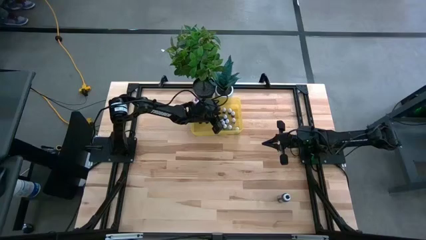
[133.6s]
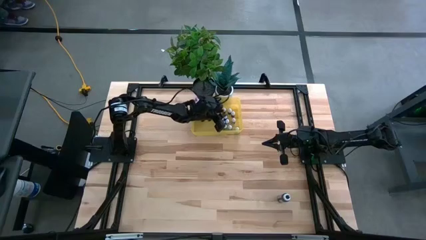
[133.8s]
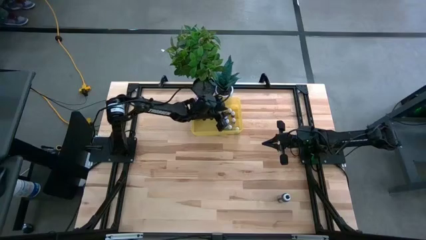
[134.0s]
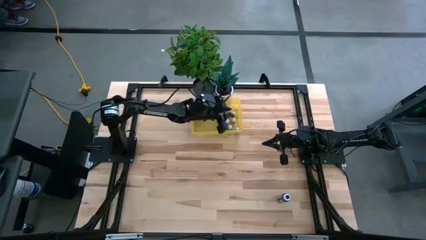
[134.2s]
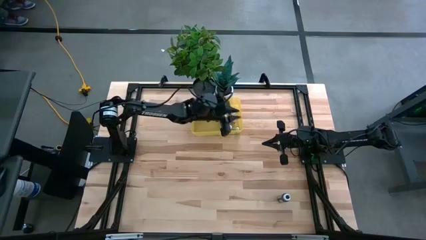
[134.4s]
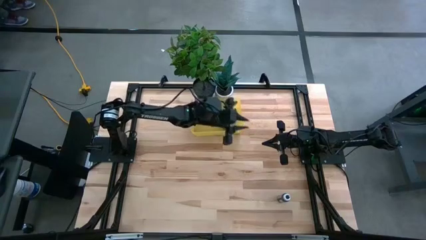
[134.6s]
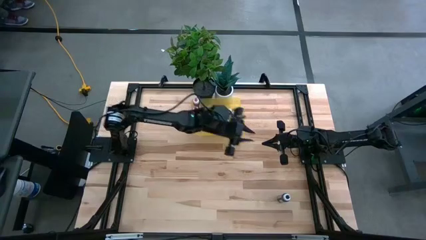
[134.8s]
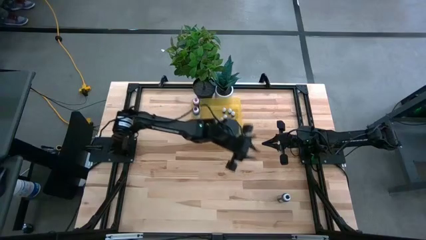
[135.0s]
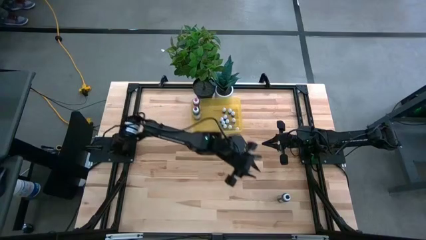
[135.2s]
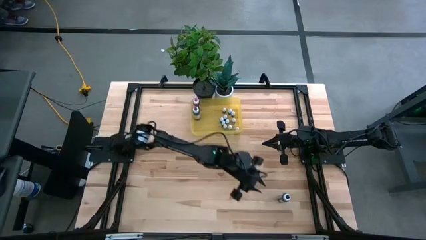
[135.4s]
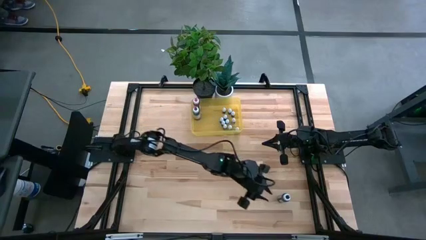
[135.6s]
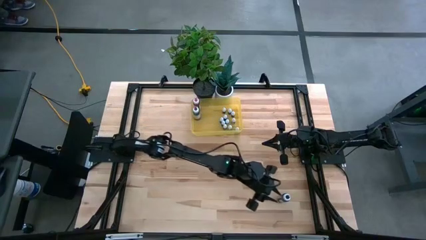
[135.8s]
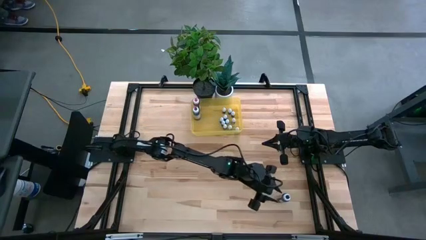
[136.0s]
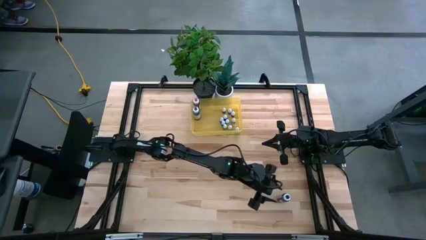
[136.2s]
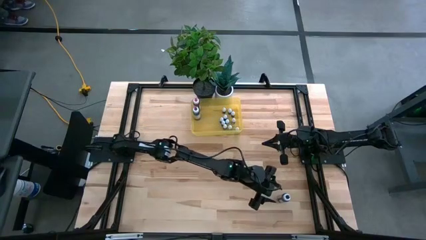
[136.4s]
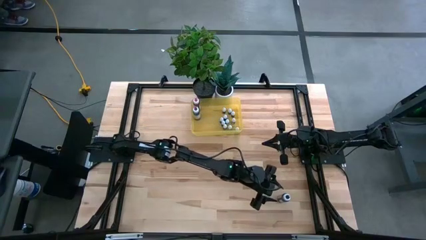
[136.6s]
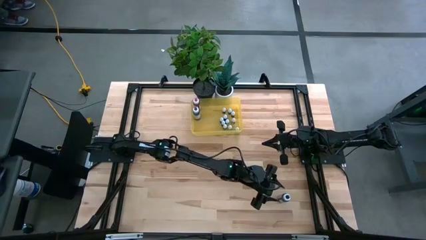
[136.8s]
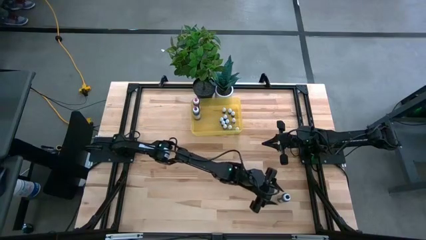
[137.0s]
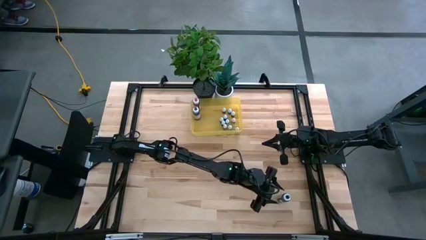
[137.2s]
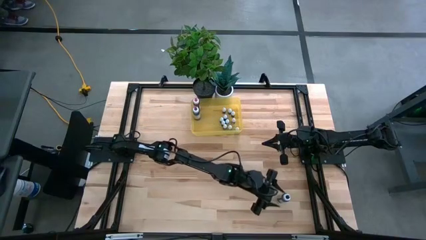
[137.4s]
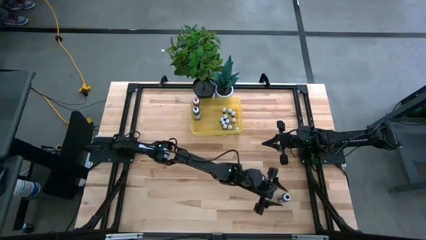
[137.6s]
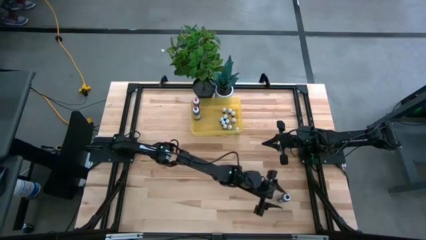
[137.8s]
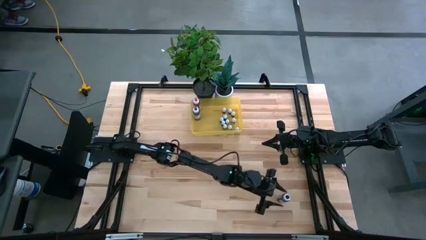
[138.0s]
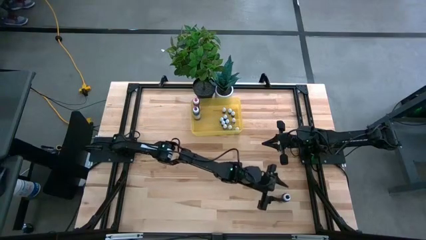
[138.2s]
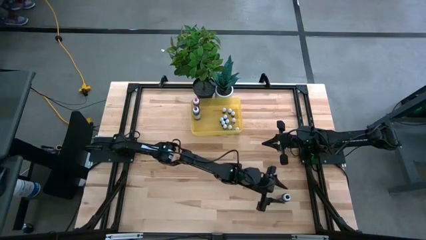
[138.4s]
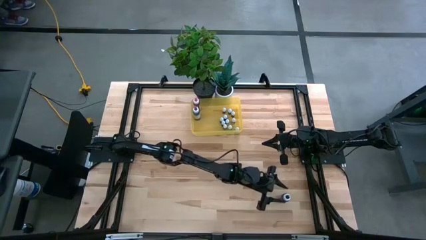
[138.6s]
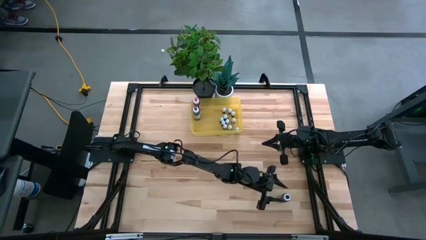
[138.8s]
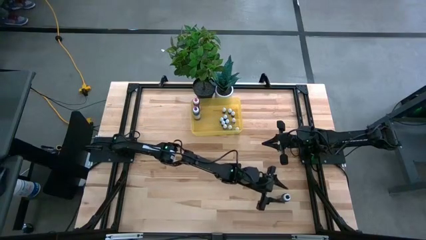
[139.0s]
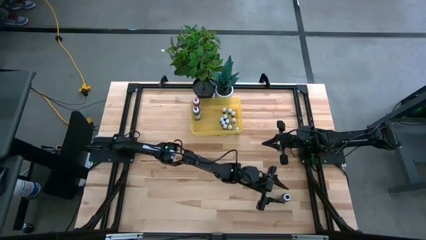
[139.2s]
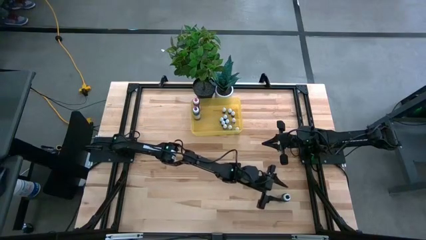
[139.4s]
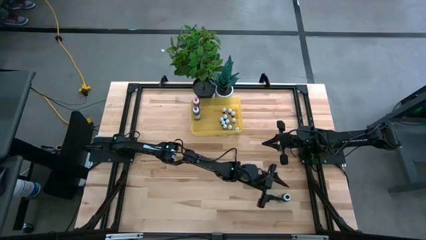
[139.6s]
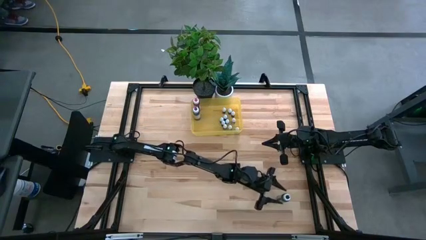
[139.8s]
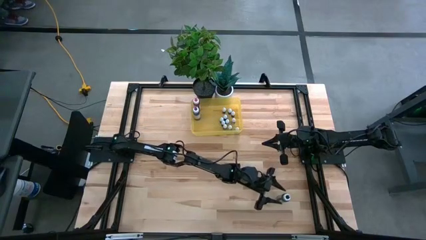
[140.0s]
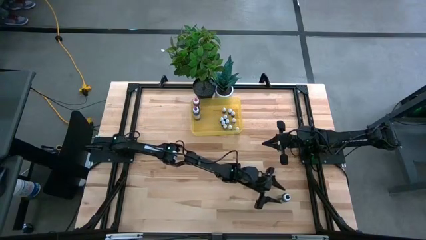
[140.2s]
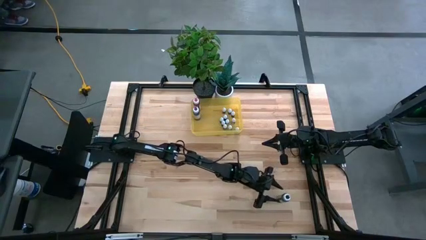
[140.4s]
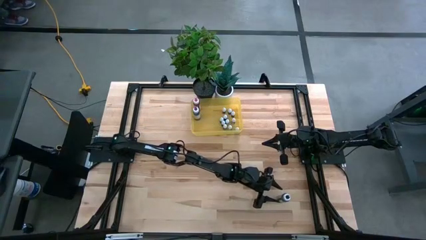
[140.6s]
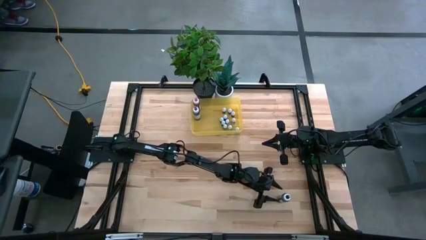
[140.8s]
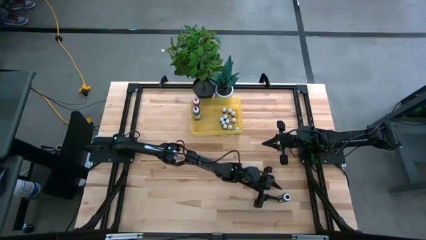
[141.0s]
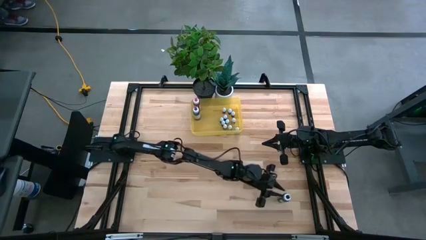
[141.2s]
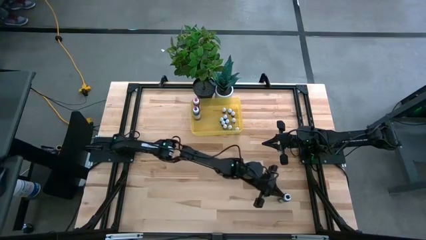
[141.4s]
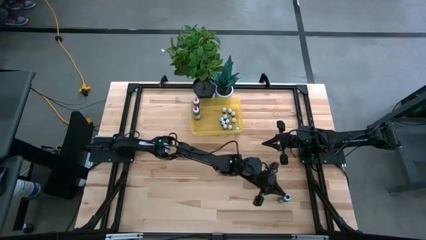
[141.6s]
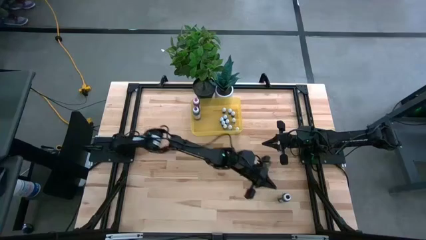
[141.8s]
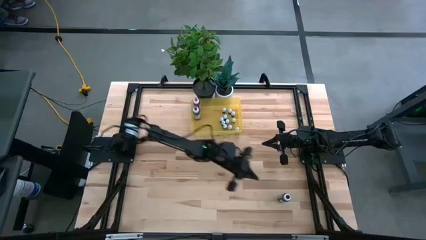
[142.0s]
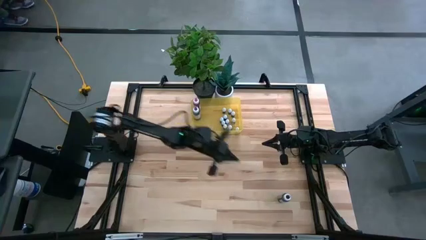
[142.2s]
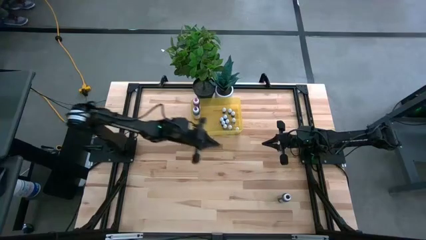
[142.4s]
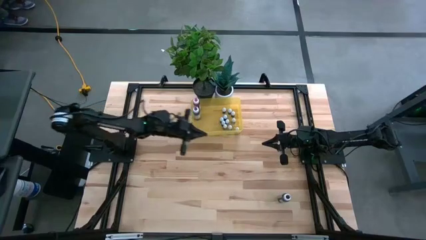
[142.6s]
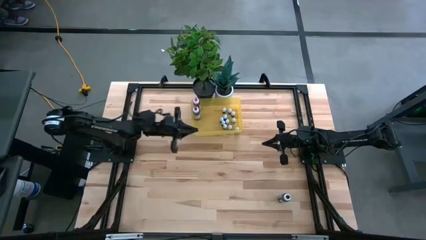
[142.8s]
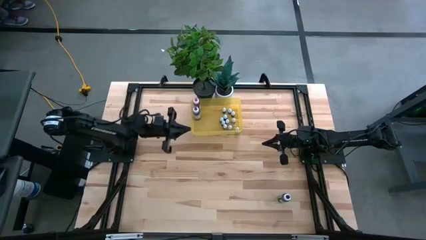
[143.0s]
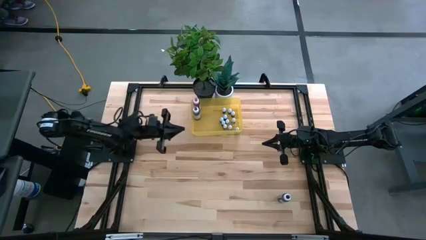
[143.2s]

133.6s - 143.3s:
Task: Pick & Place food coloring
Put the large blue food coloring bottle into the yellow bin

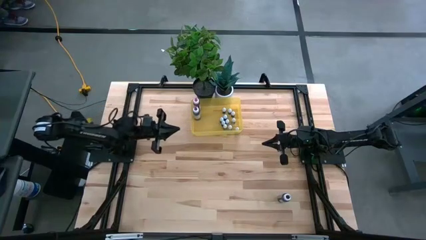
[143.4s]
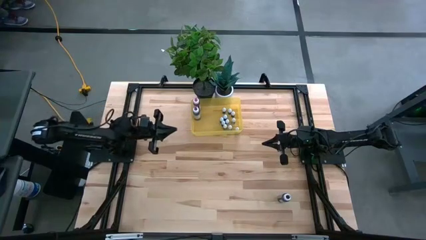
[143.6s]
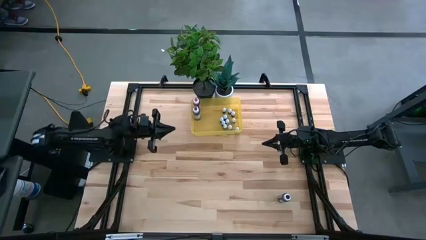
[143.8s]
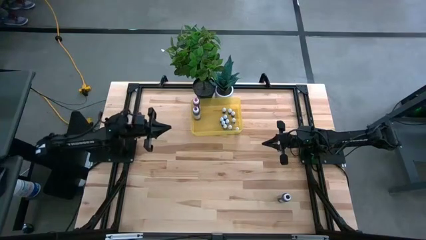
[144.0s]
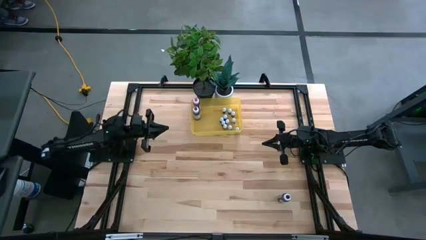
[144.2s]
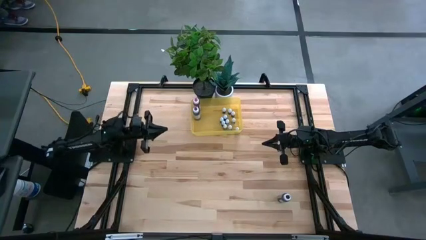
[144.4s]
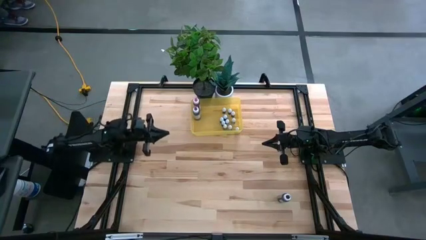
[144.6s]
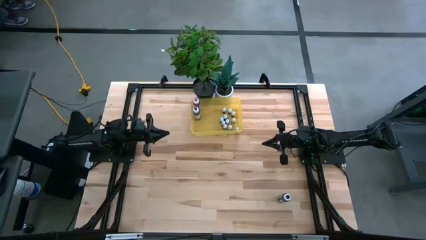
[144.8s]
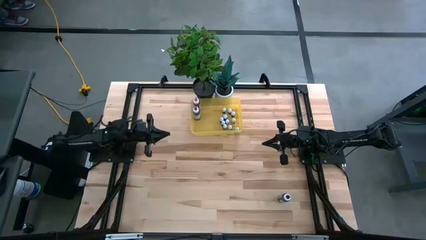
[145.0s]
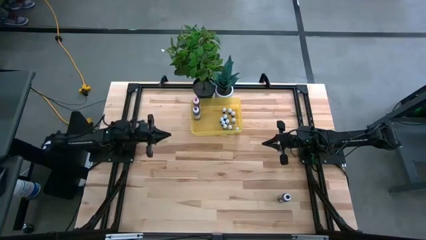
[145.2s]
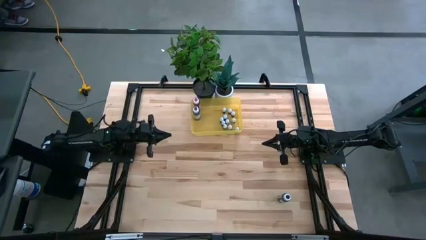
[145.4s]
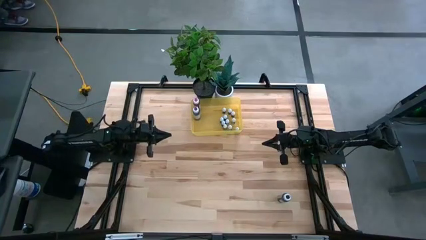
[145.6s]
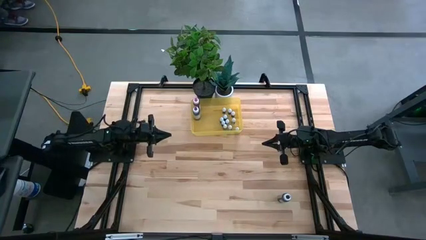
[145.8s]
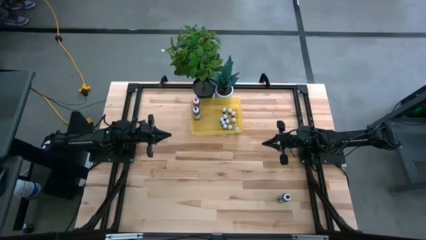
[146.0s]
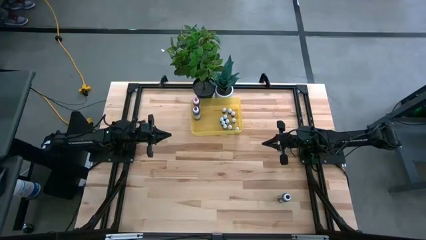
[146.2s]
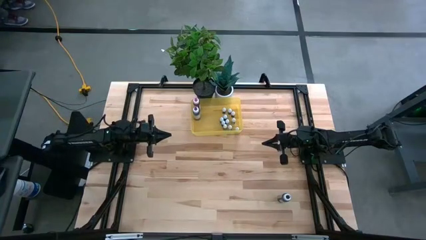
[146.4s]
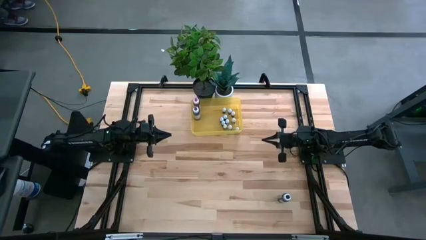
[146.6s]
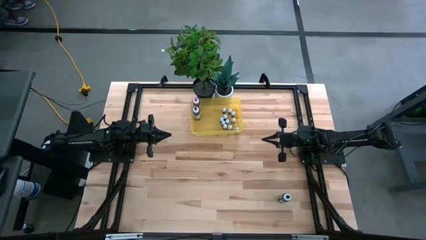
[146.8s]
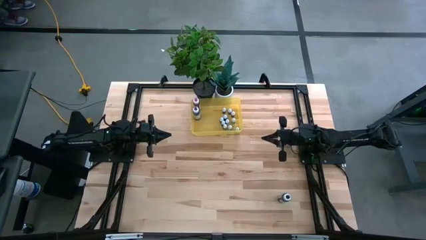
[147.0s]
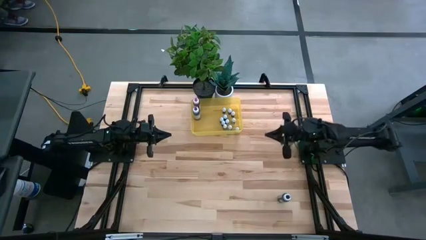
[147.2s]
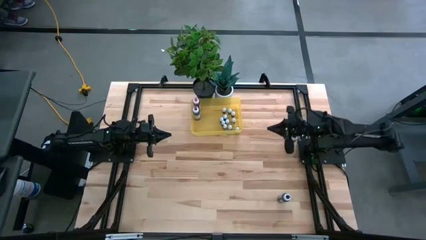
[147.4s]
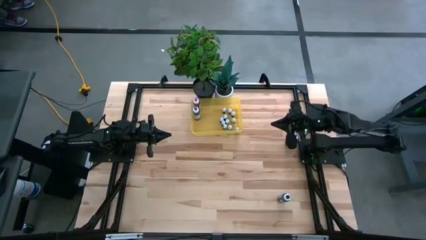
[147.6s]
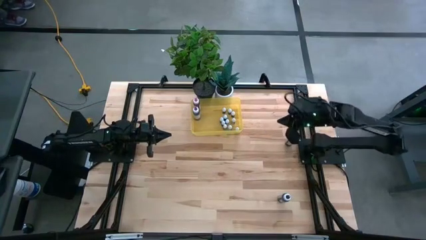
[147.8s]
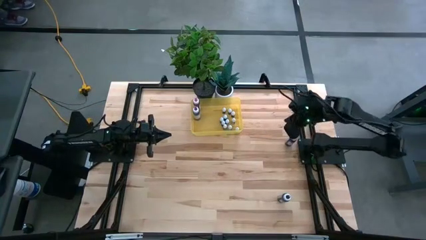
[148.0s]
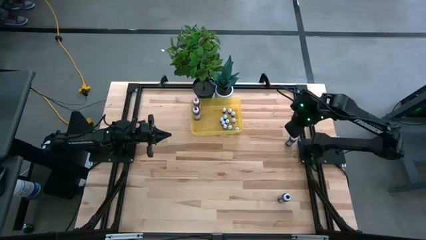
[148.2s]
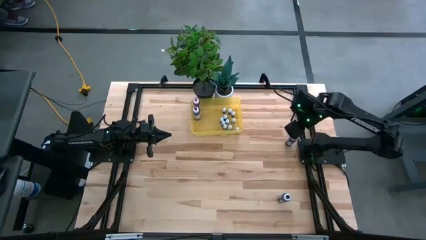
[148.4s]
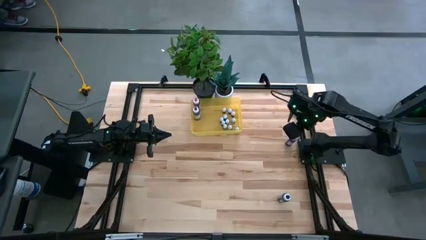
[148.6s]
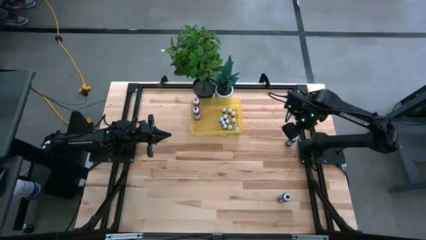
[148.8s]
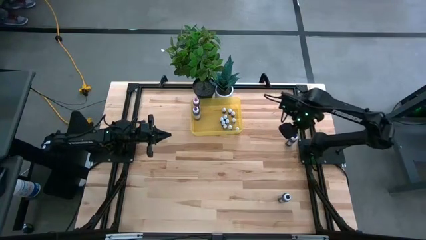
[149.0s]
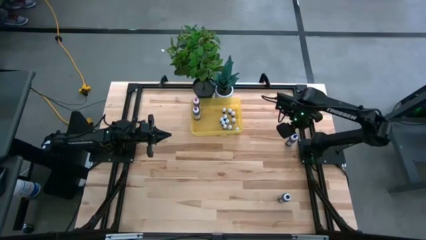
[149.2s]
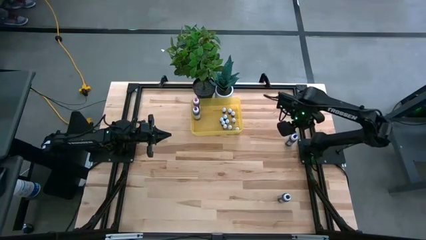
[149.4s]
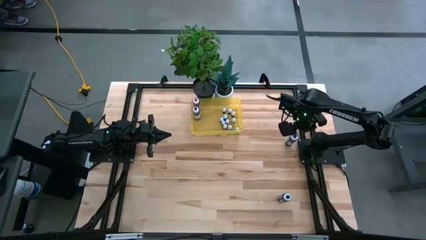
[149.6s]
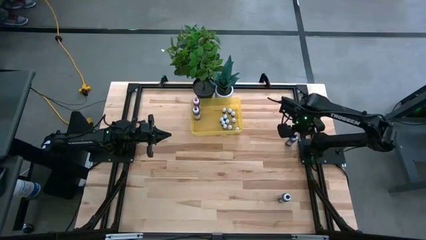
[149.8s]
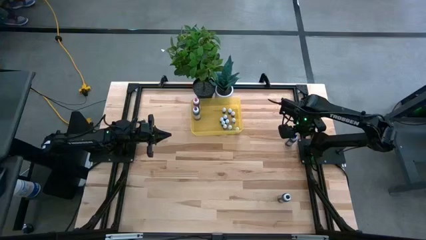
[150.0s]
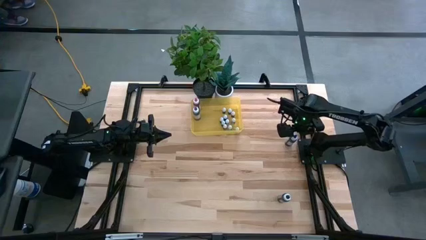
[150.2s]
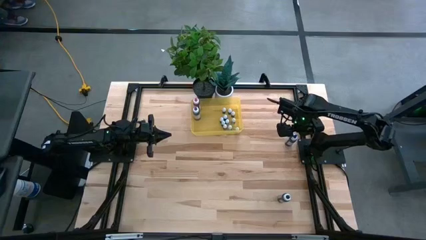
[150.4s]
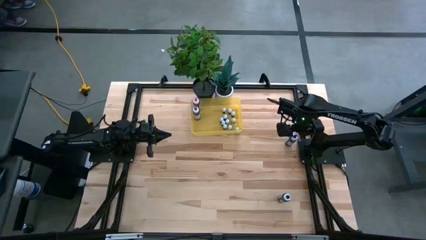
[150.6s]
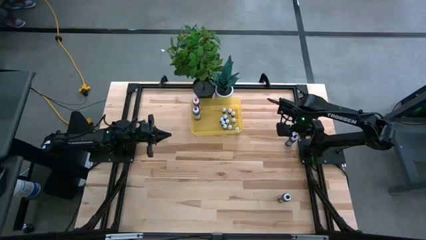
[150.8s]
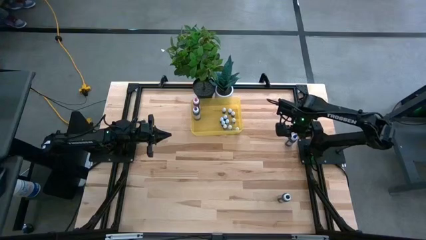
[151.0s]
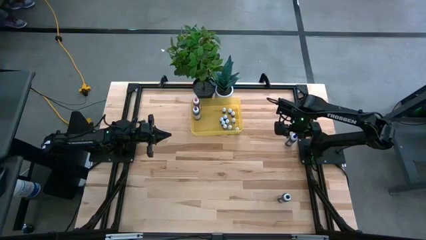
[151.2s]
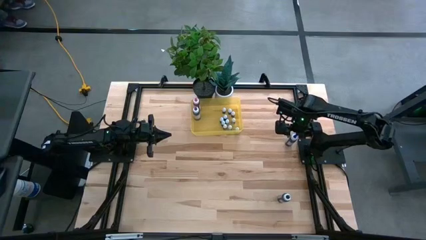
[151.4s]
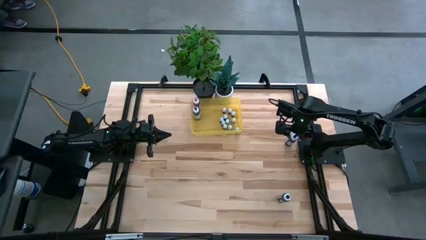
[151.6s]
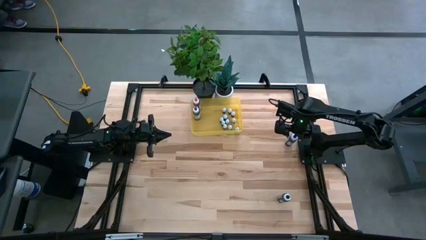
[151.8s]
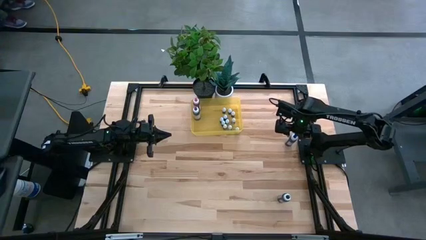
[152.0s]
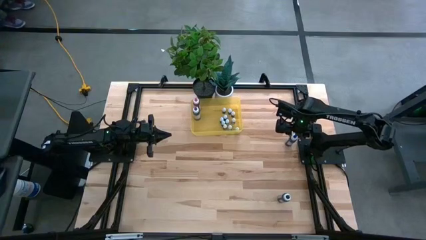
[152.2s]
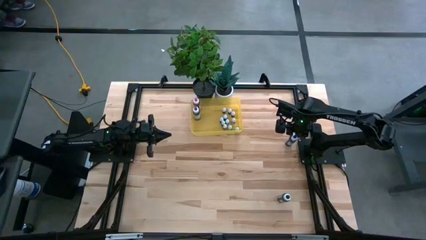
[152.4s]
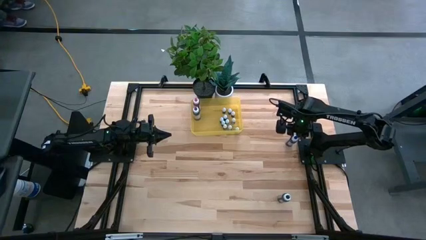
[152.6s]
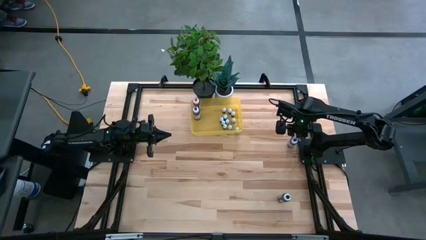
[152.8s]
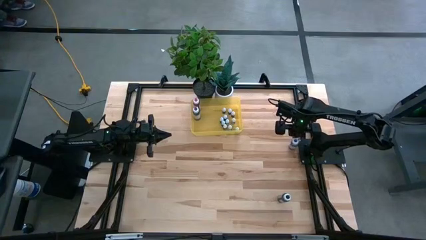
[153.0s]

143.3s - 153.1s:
Put the large blue food coloring bottle into the yellow bin
